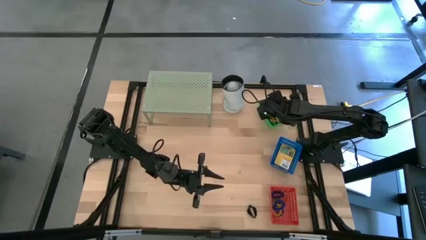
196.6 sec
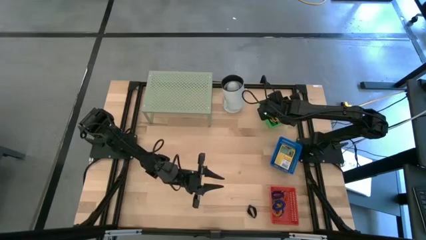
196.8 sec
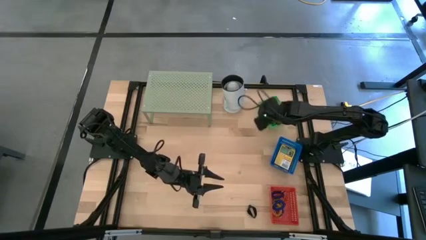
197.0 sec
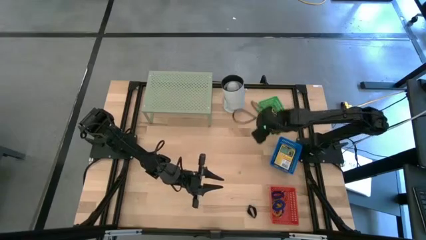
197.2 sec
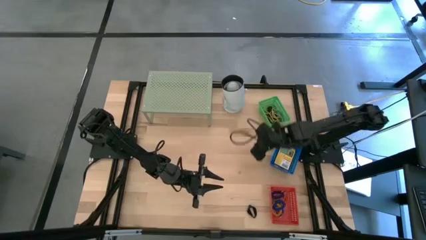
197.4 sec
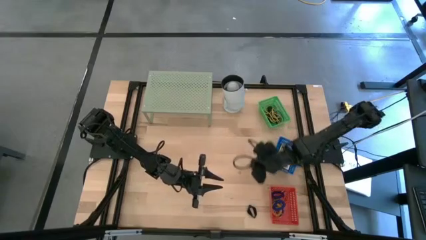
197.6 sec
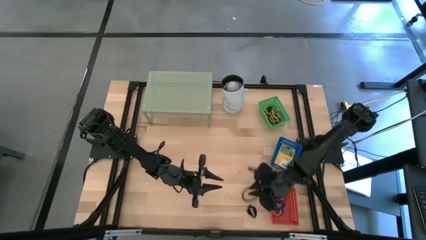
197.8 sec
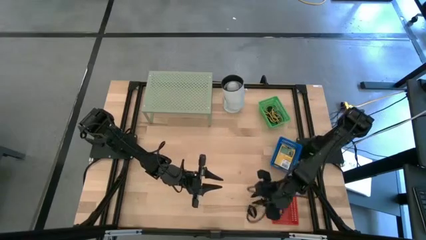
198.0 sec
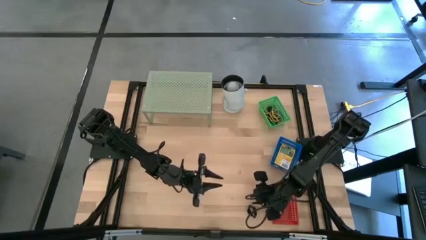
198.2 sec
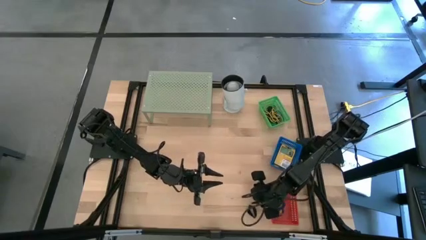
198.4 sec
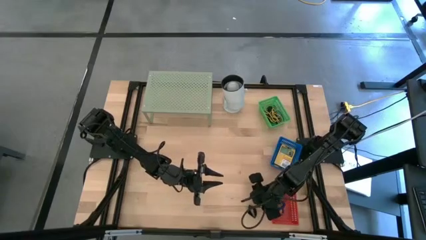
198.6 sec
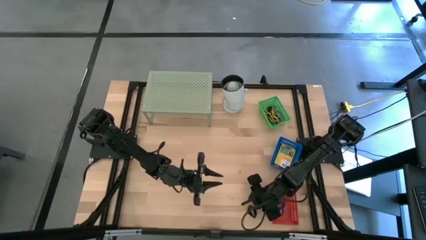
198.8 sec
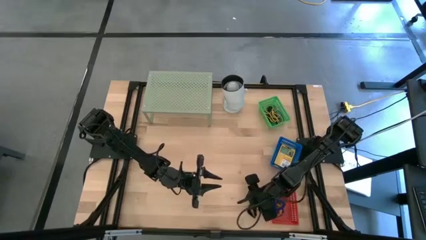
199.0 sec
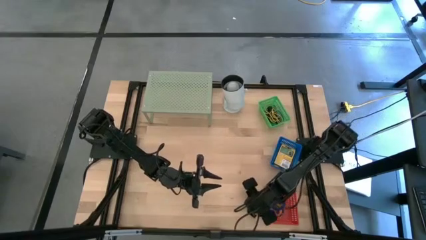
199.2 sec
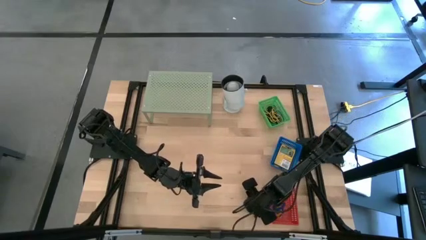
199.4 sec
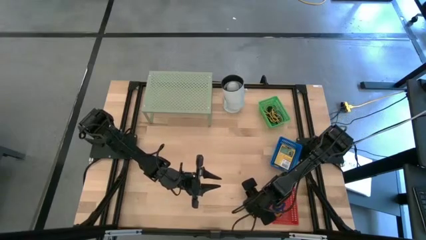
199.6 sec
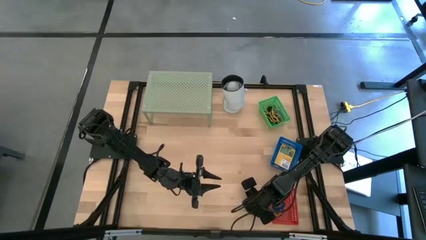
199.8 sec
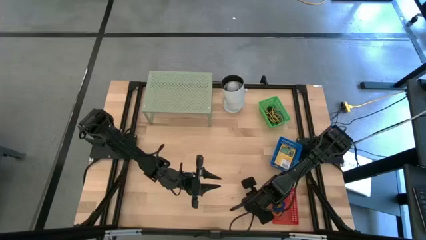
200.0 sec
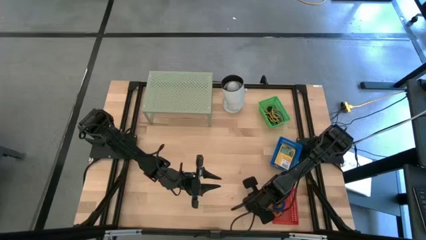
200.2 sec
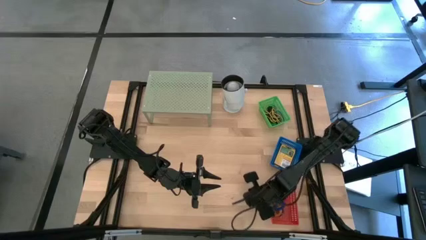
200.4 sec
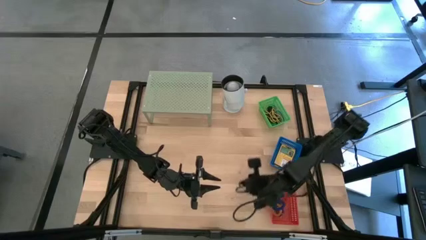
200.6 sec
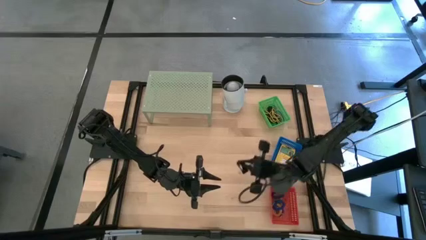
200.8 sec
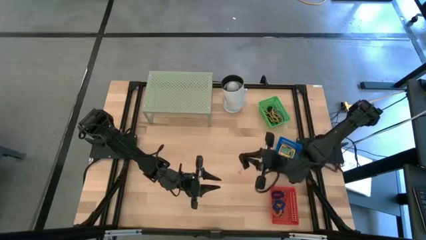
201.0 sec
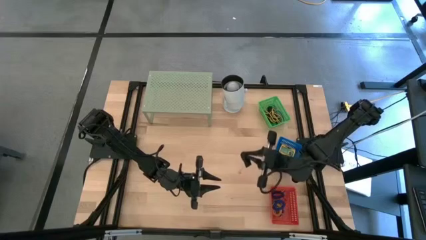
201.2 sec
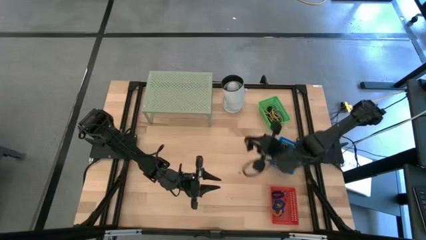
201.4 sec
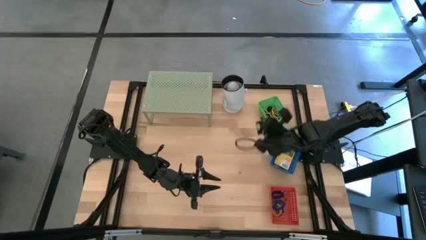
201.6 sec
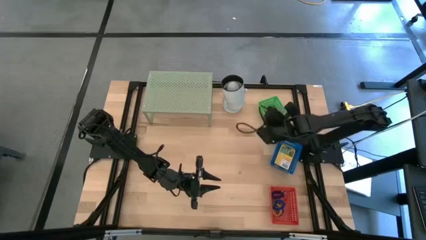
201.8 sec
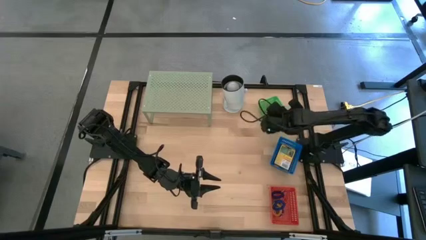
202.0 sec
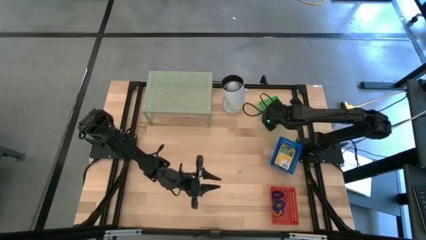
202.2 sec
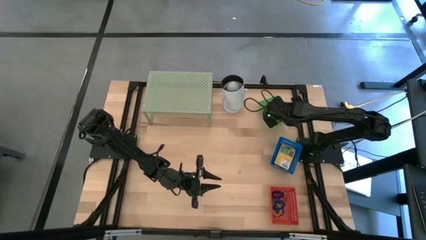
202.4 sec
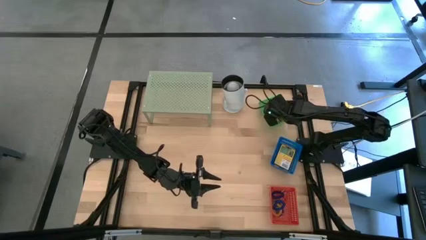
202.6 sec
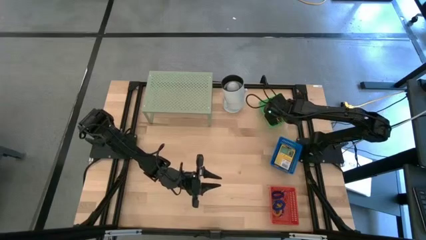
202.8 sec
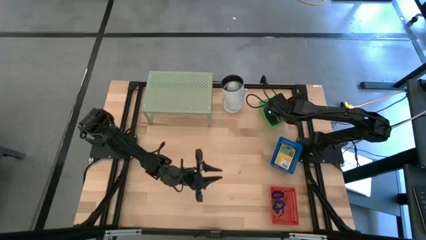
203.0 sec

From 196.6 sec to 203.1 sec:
Task: Pick & Place Office Desk Supplies
Put the black rubber band into the green bin

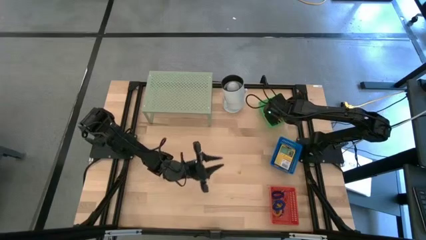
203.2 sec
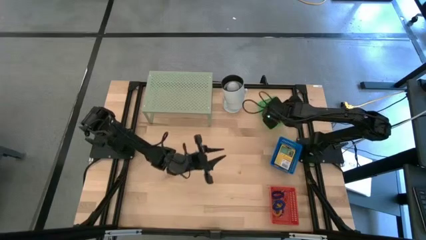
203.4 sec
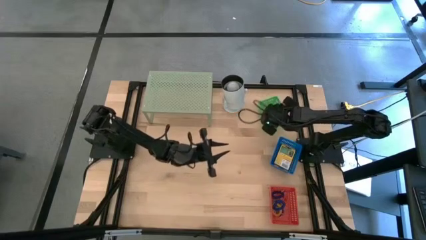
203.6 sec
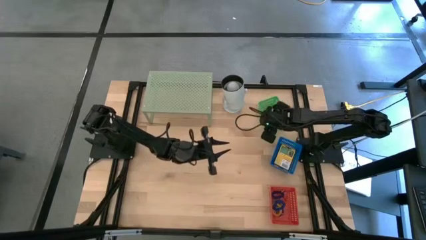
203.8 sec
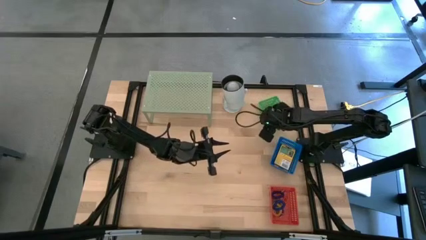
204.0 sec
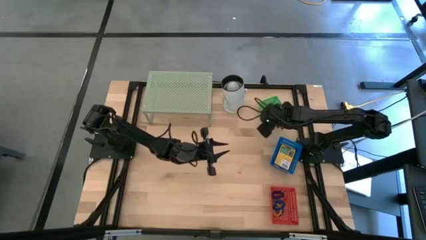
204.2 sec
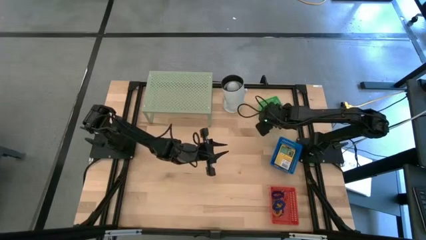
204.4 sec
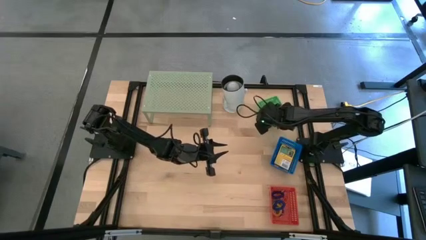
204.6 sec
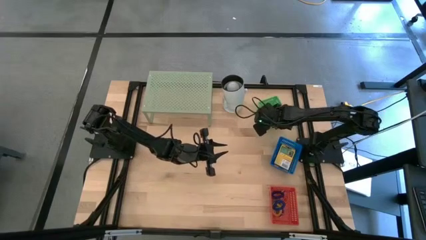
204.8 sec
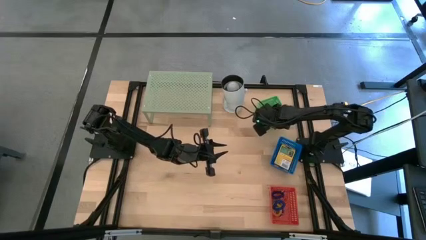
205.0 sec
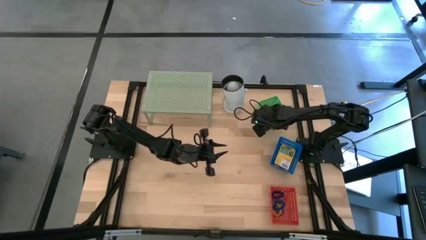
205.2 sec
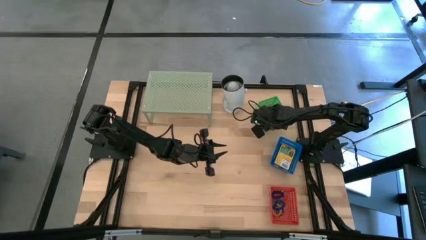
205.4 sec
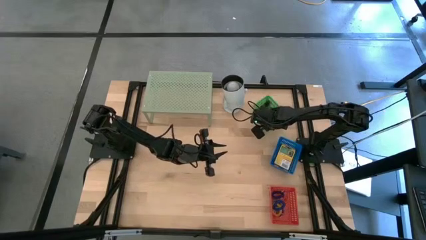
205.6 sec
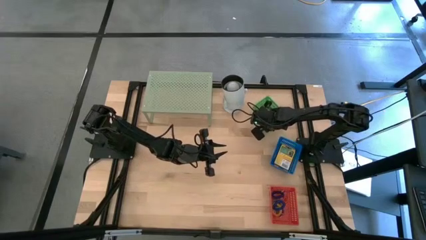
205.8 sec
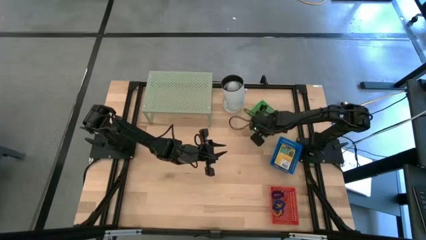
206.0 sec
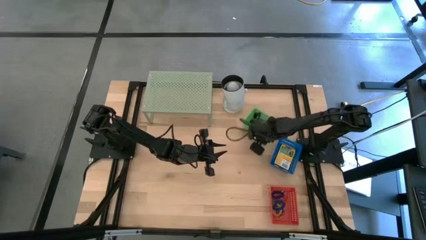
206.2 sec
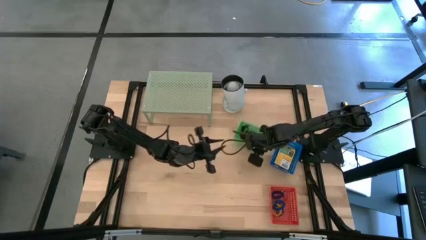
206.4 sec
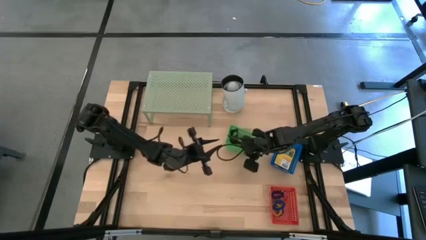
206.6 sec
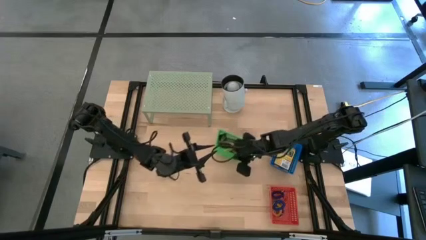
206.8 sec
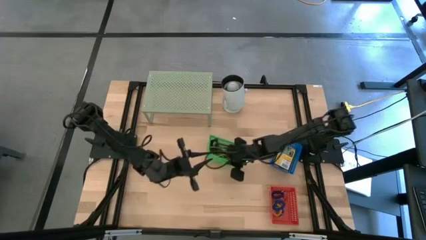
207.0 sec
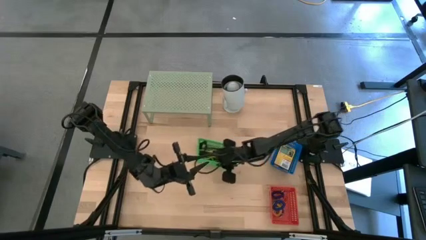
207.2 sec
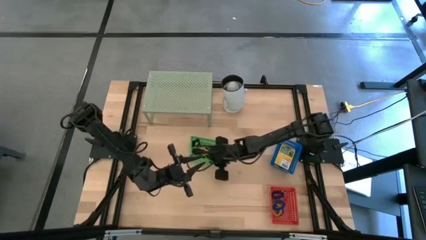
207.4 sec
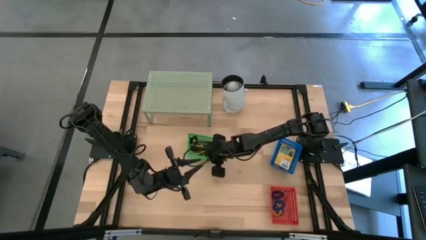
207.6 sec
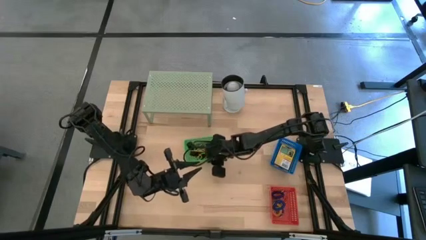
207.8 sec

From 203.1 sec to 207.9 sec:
Move the green bin to the center of the table

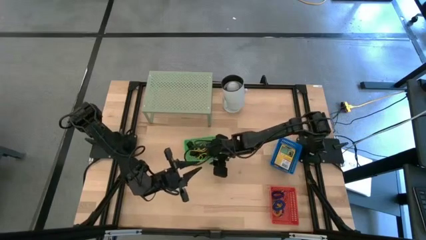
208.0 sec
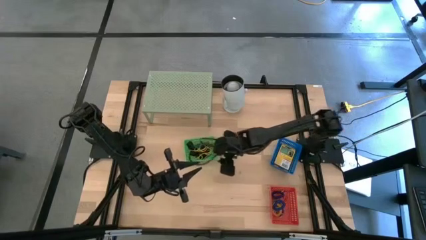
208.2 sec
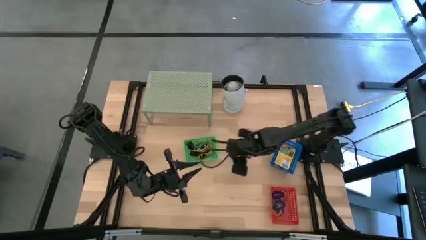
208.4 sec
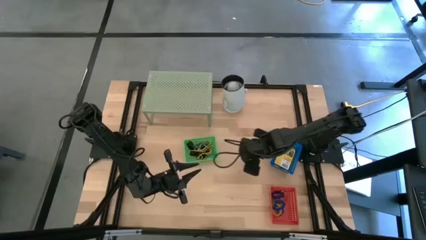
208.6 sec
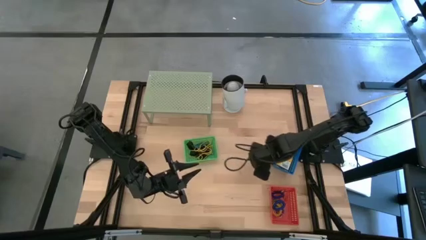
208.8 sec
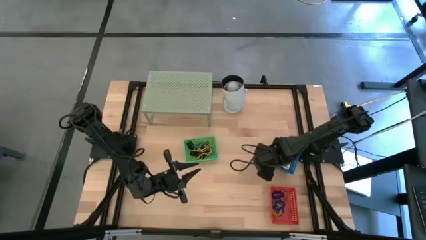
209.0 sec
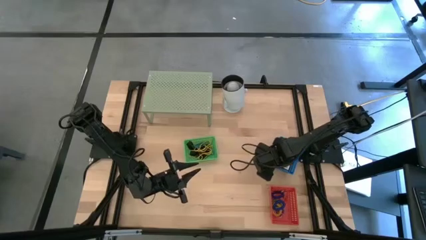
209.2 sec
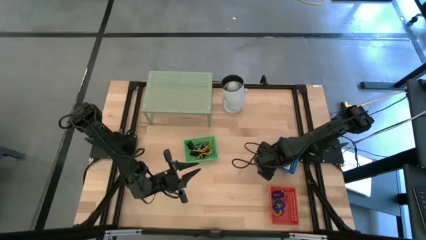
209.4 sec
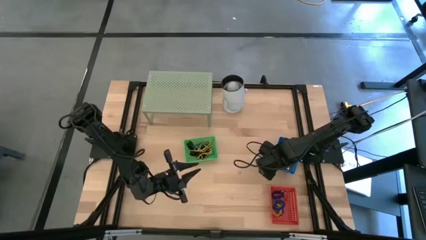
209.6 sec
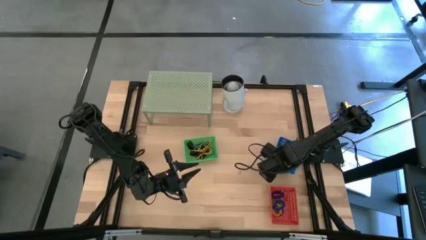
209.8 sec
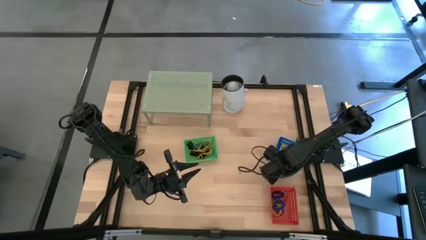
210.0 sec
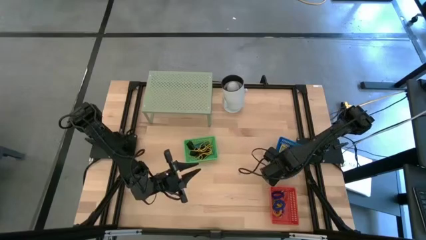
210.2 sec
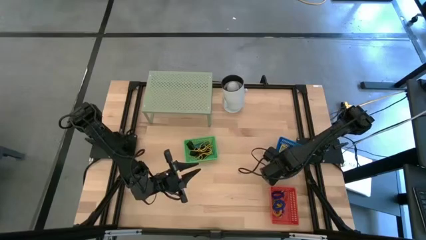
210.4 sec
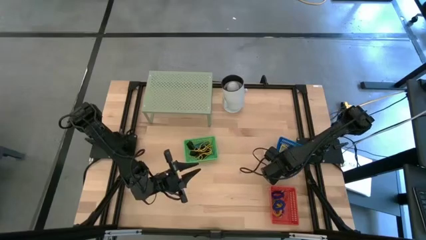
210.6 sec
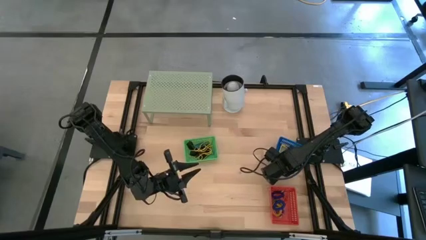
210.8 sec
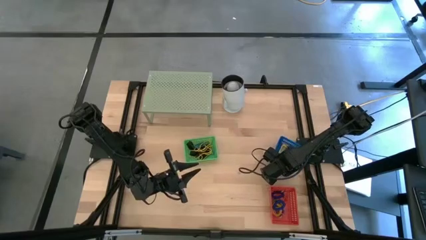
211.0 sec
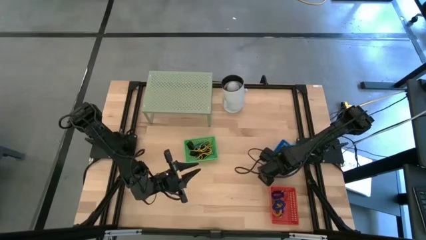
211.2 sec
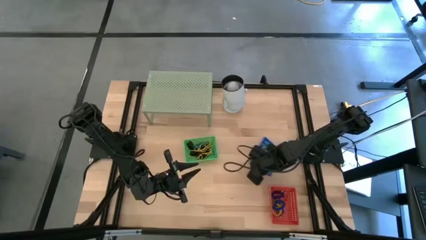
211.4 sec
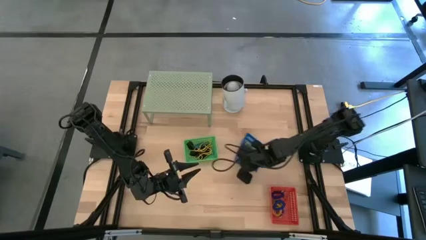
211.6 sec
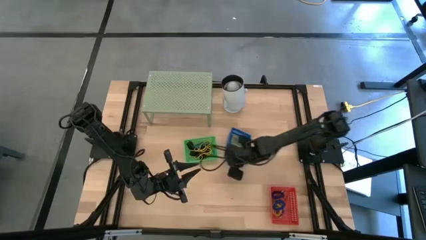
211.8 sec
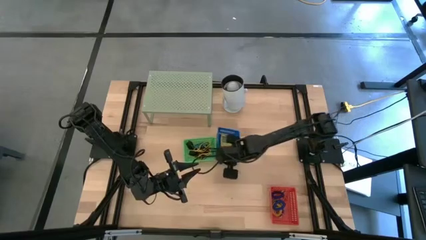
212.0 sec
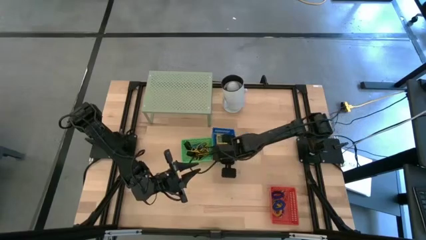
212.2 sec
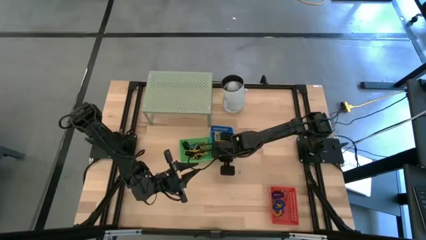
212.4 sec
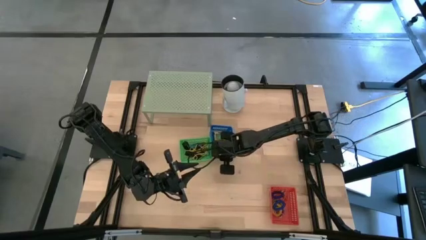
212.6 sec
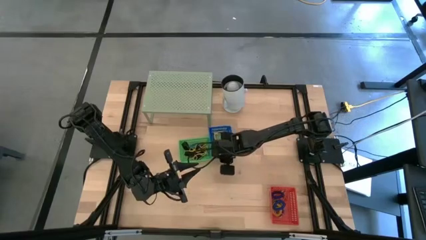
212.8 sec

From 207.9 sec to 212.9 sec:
Move the blue bin to the center of the table
